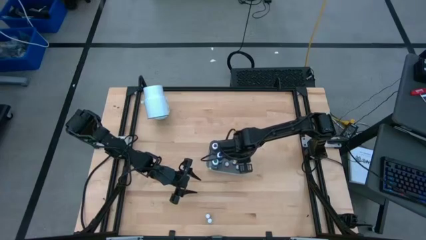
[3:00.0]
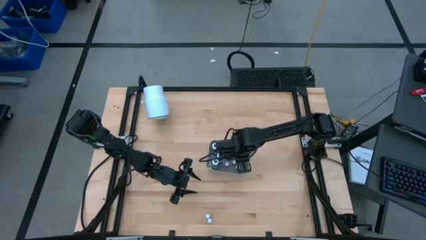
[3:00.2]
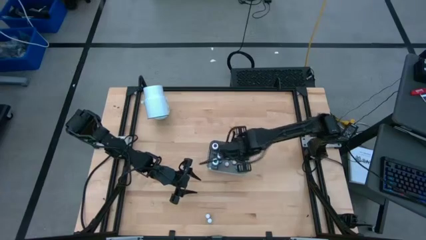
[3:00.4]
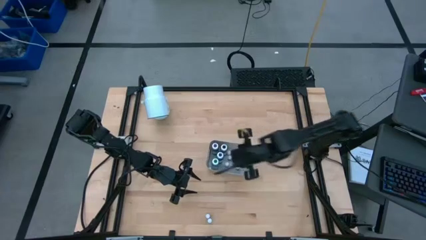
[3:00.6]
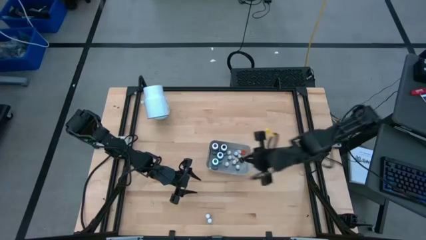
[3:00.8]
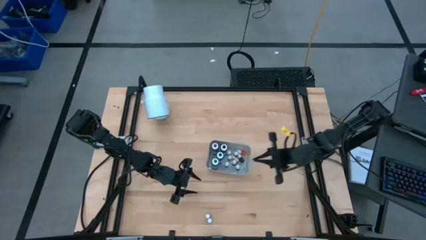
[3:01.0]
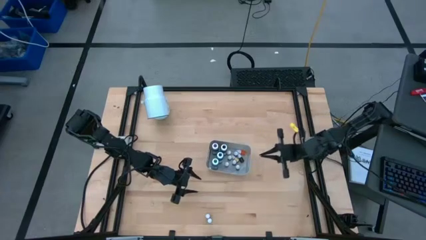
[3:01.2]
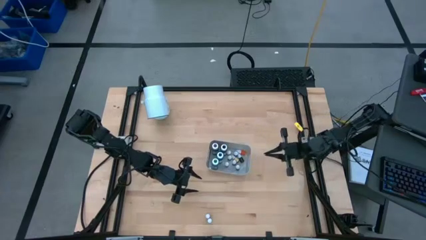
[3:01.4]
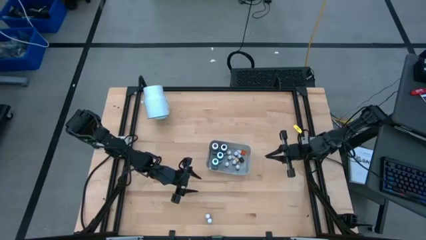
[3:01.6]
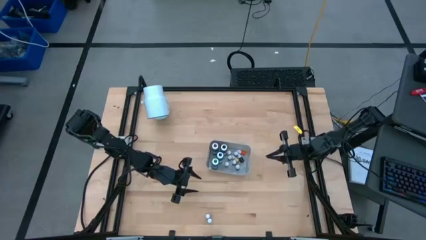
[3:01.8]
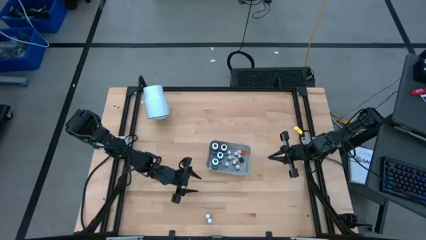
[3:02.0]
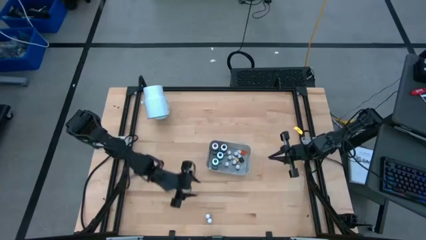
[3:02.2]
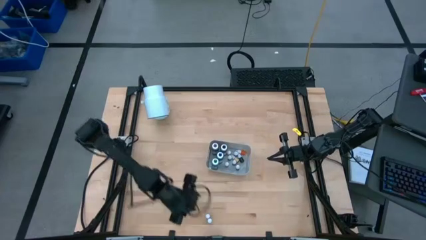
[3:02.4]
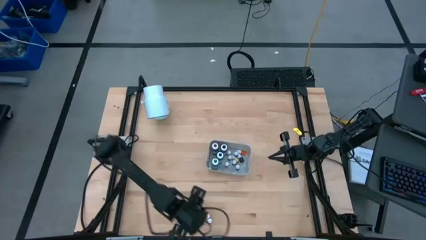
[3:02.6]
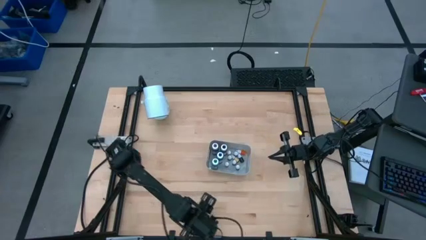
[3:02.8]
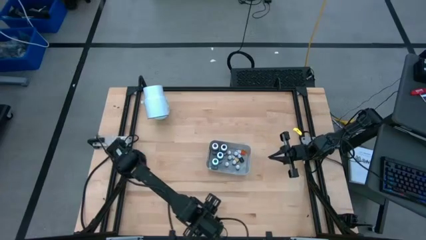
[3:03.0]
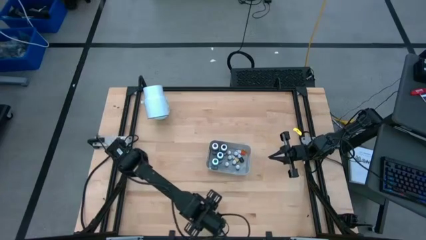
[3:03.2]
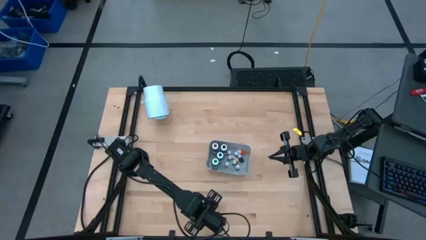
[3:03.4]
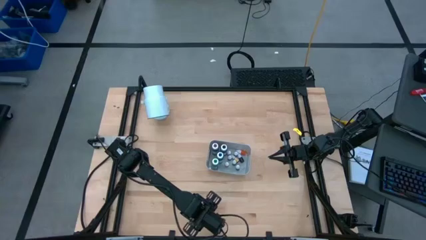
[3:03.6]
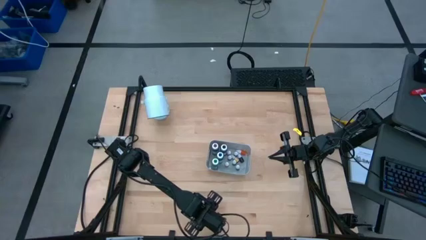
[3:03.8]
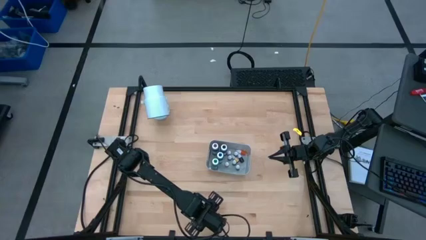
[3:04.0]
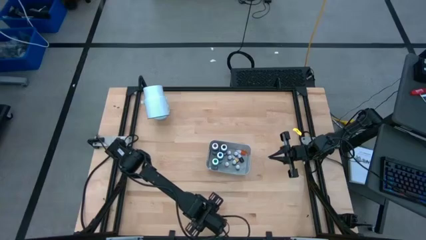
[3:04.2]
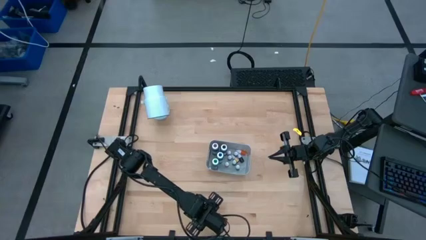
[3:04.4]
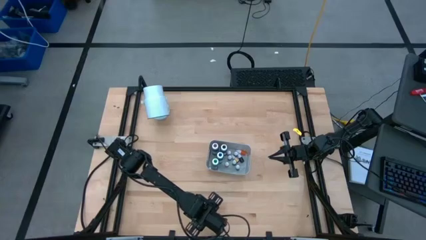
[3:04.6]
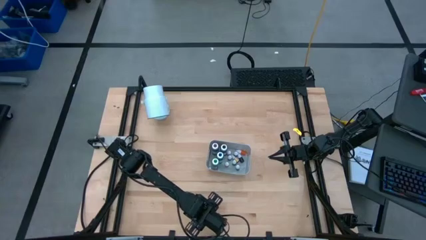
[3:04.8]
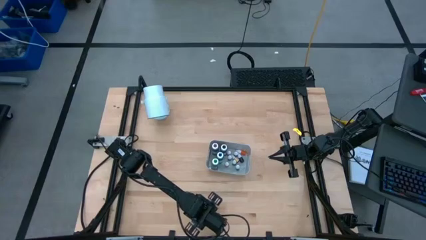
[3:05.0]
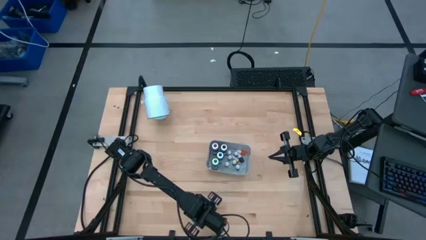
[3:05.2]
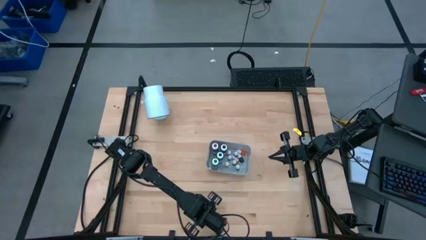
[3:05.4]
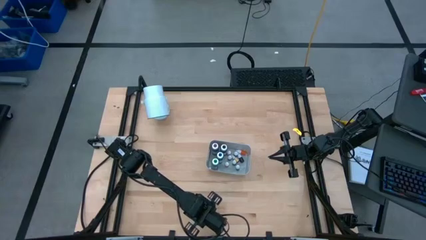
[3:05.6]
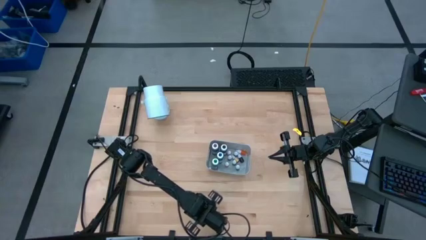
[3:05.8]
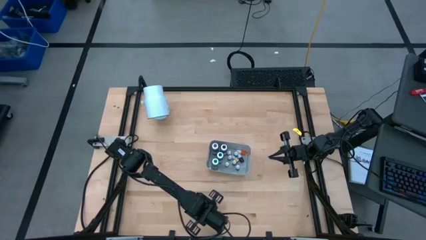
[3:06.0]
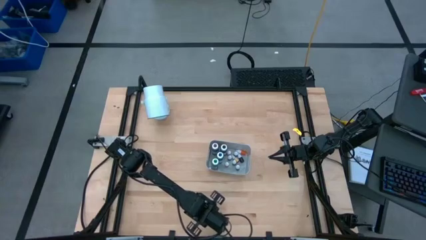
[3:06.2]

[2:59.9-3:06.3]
Task: Pick & Place food coloring
Put the small black food coloring bottle into the bin

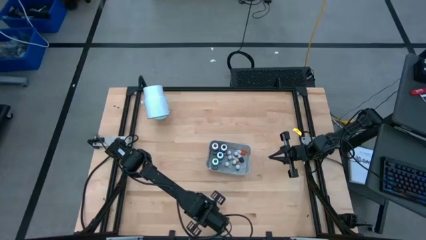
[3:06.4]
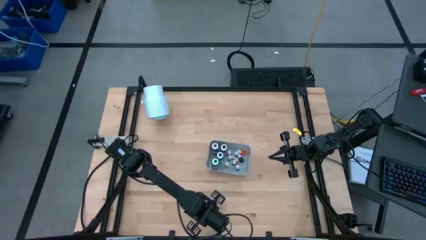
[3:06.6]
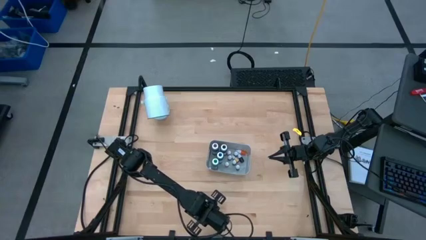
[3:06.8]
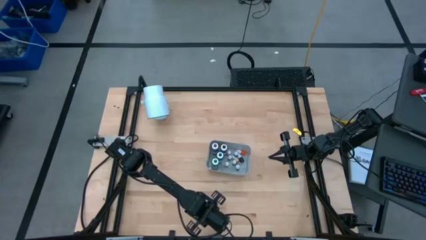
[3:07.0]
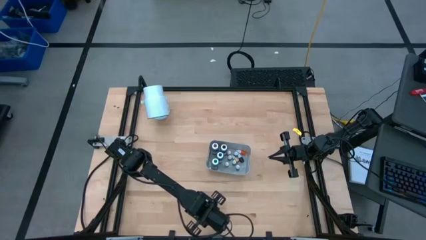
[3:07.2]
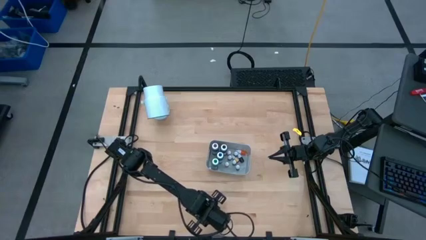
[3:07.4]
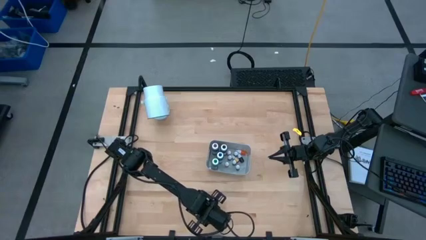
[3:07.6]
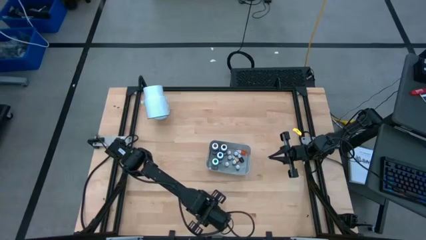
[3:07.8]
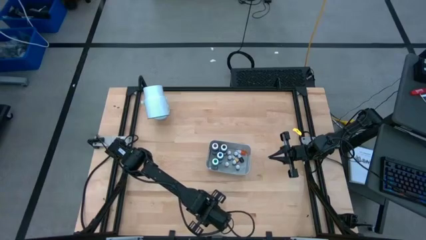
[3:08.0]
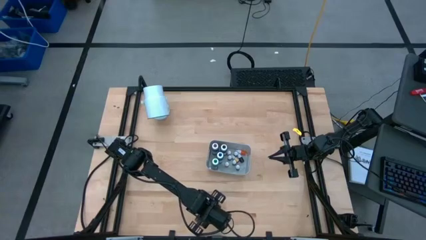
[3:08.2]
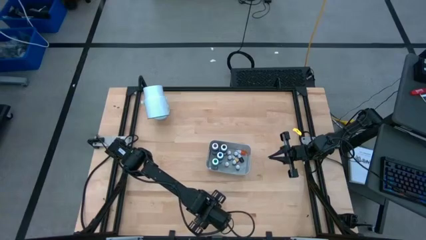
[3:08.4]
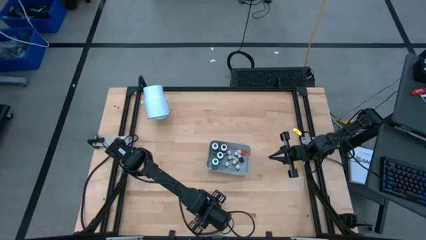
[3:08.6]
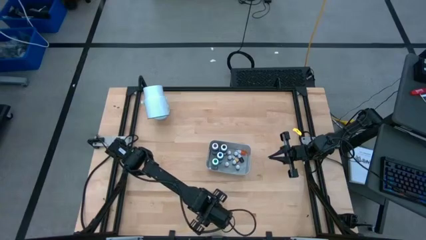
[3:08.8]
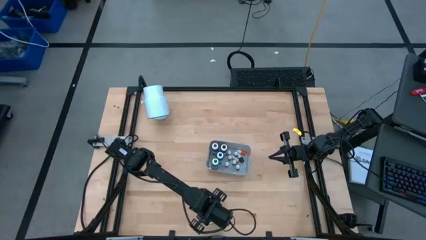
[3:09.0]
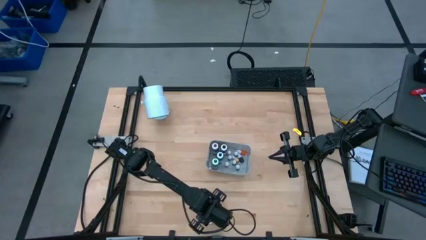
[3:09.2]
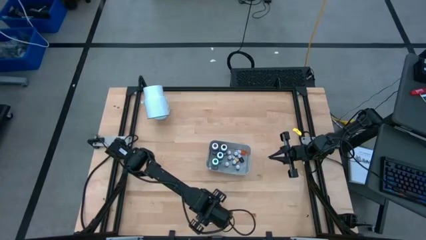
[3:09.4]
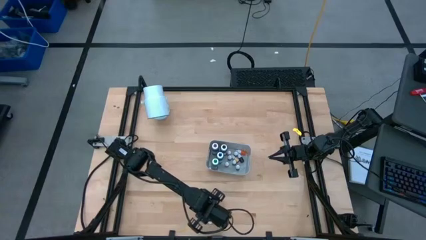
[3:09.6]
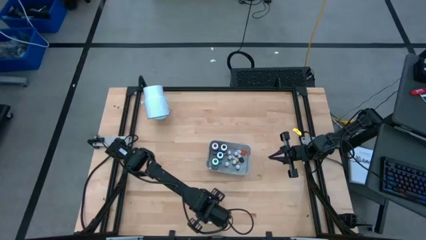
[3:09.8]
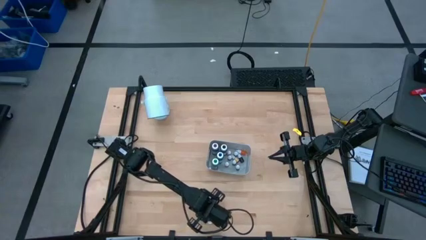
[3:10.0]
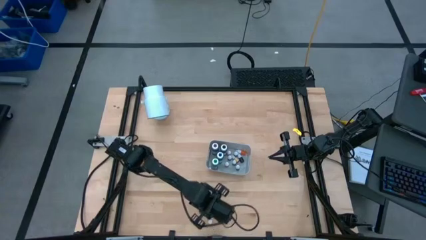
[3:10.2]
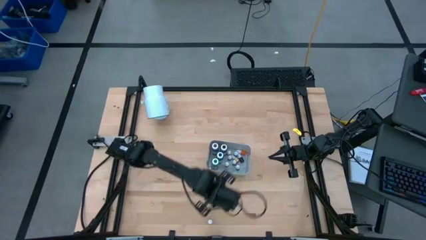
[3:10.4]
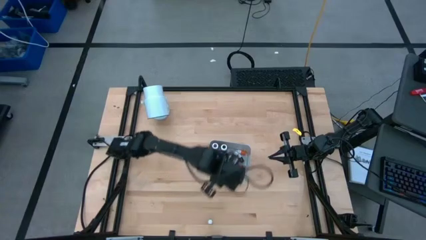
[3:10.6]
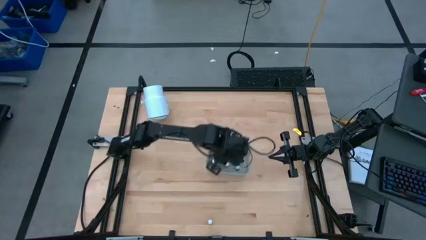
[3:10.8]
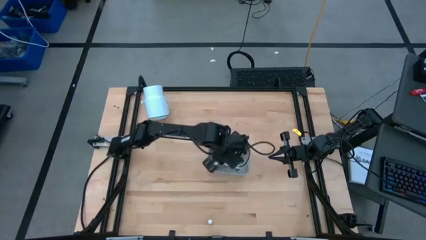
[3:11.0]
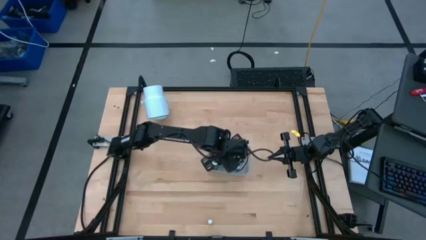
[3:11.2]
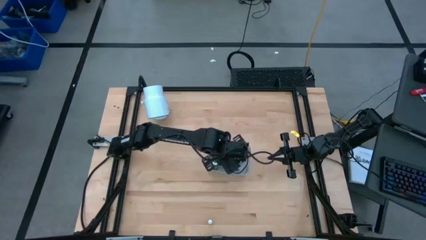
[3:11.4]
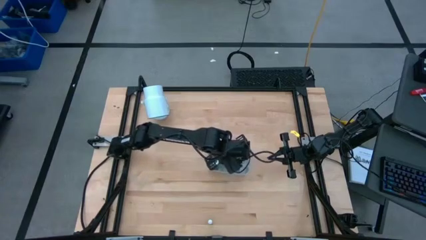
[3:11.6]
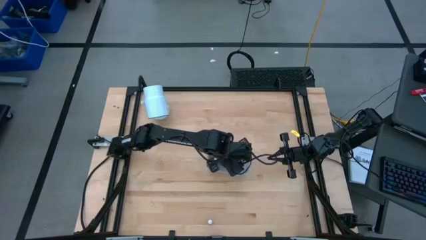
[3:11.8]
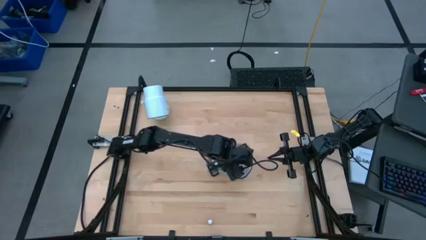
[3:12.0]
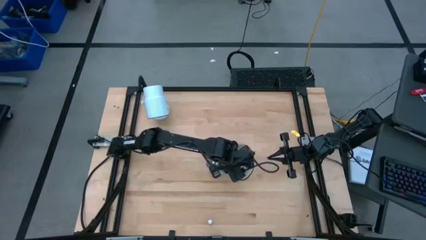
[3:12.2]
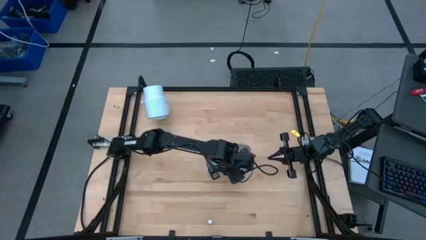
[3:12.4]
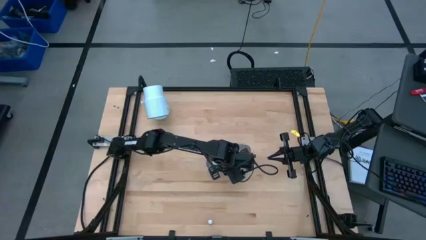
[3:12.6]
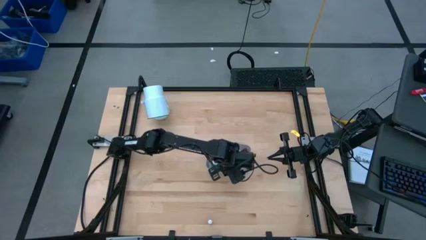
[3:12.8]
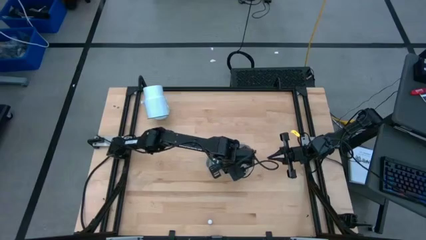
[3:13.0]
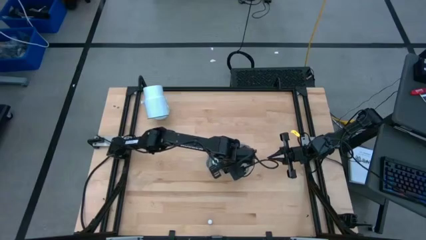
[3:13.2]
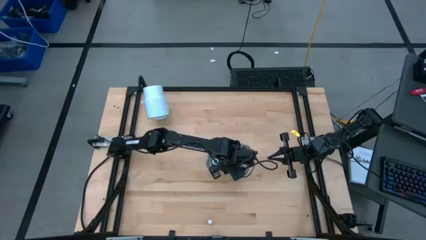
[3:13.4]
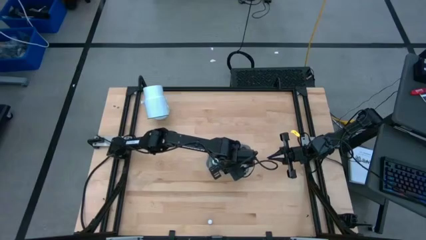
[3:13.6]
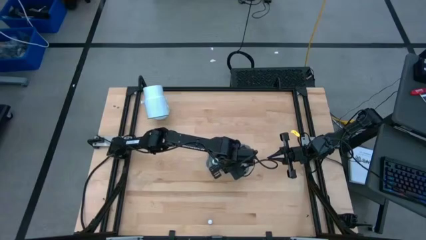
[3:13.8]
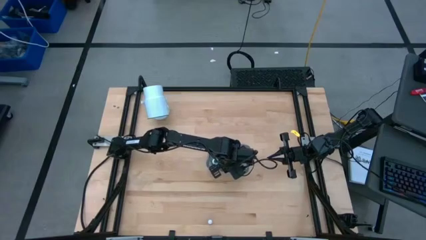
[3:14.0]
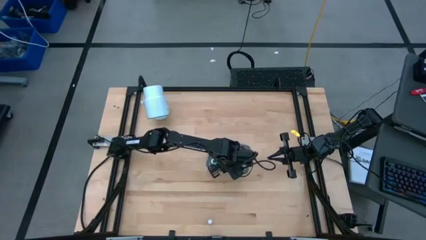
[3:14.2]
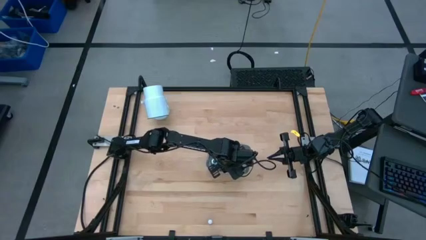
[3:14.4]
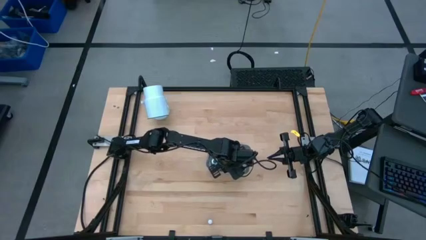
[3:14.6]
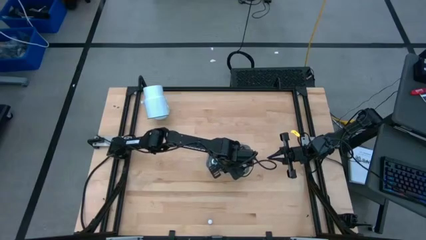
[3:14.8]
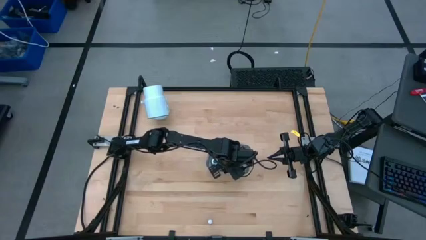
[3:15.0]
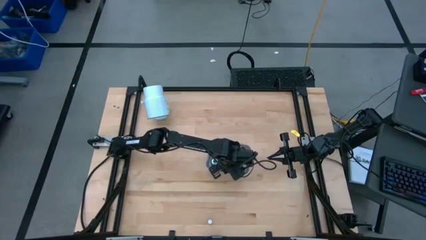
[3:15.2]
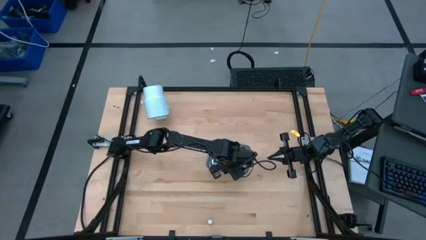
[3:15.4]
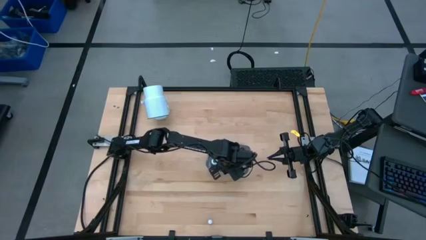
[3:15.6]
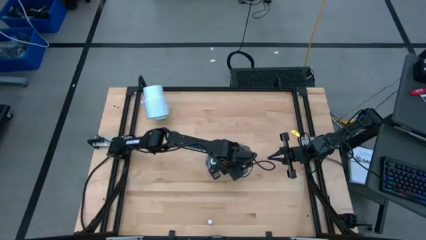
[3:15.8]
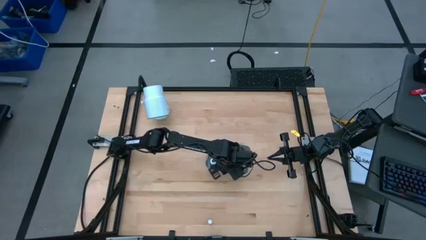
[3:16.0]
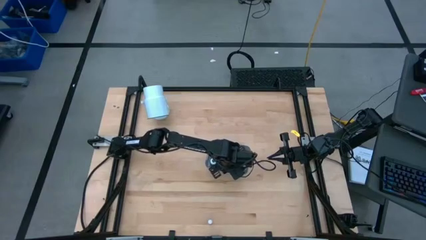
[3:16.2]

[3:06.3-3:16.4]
Put the small black food coloring bottle into the bin
